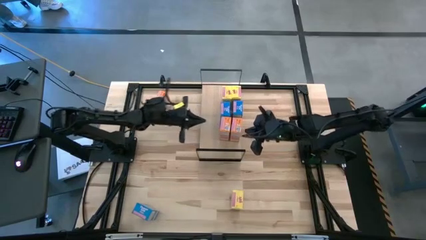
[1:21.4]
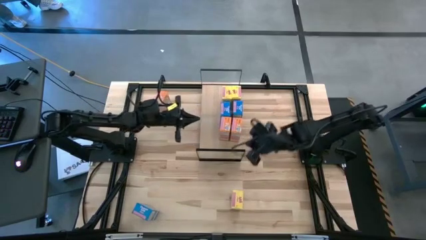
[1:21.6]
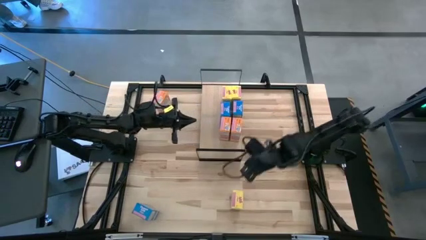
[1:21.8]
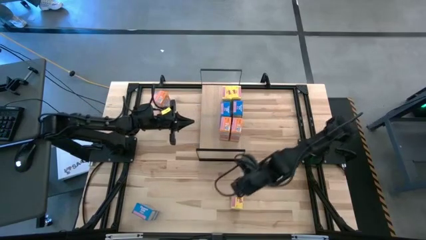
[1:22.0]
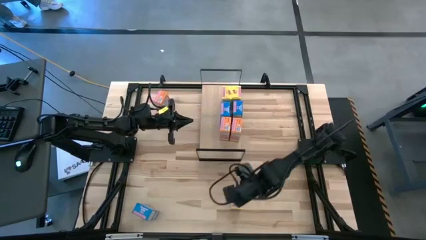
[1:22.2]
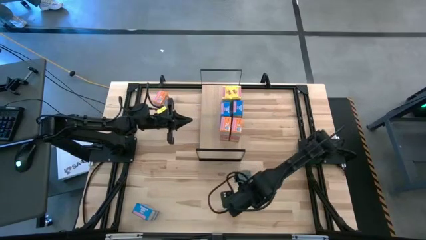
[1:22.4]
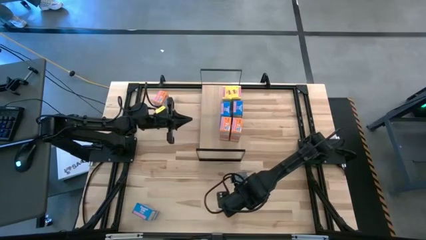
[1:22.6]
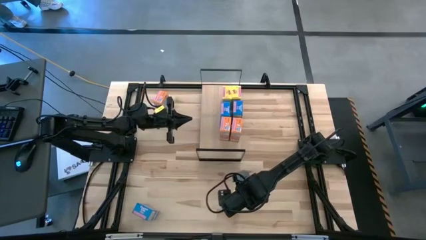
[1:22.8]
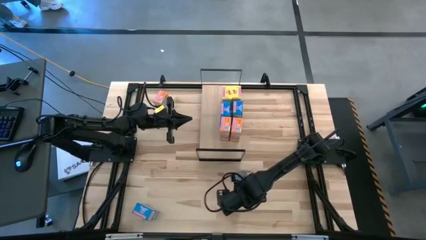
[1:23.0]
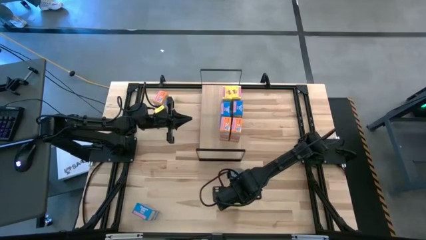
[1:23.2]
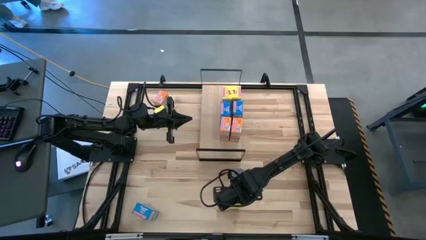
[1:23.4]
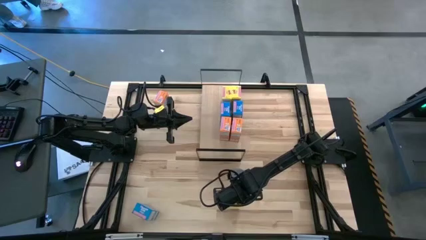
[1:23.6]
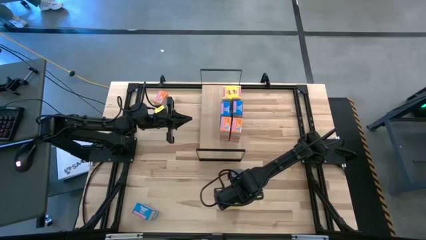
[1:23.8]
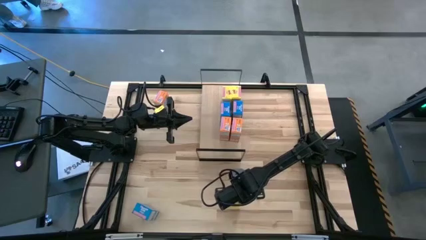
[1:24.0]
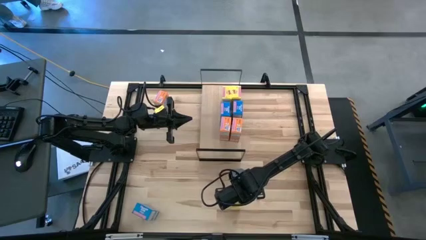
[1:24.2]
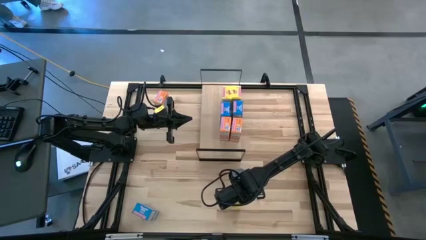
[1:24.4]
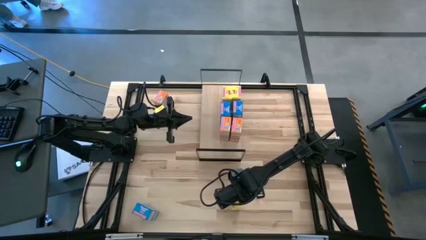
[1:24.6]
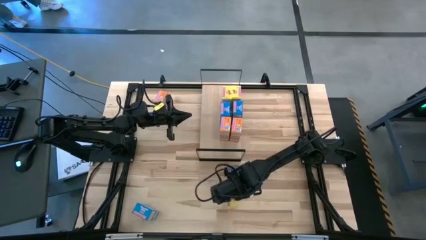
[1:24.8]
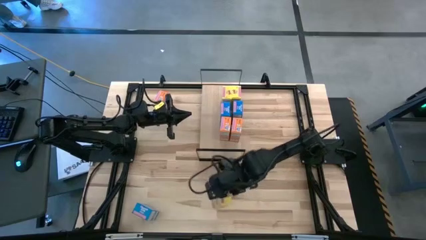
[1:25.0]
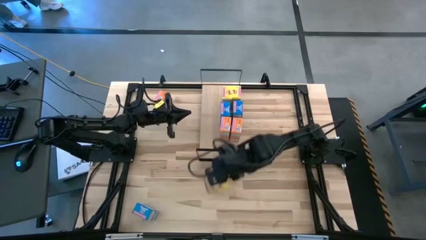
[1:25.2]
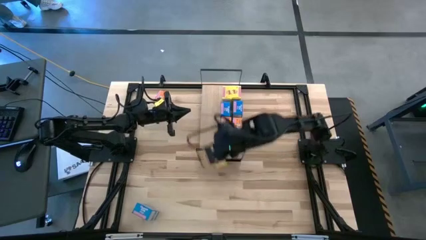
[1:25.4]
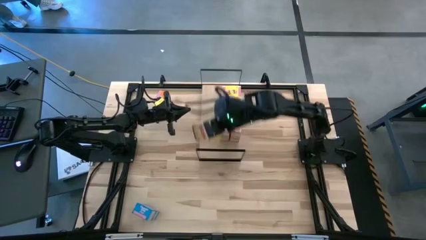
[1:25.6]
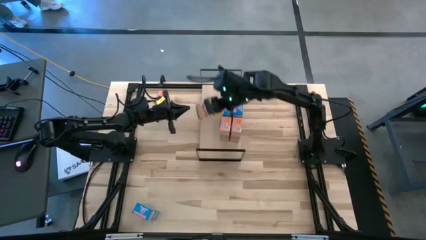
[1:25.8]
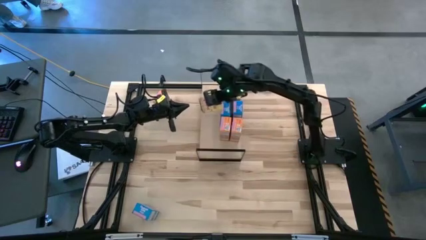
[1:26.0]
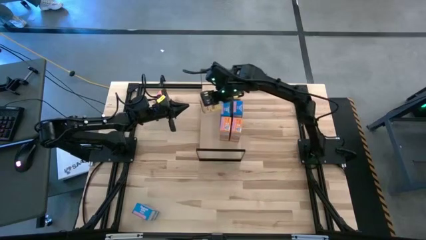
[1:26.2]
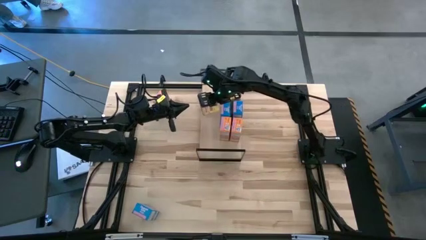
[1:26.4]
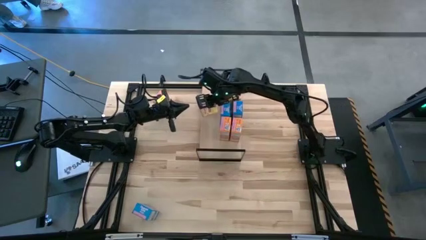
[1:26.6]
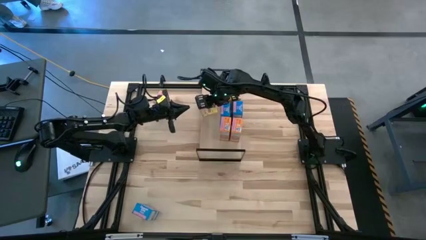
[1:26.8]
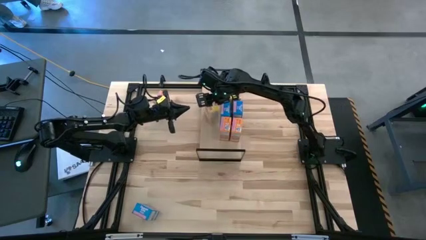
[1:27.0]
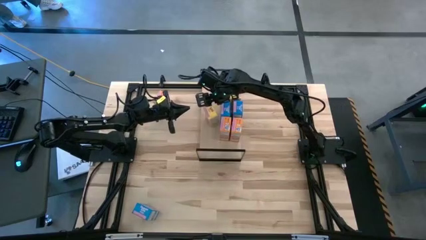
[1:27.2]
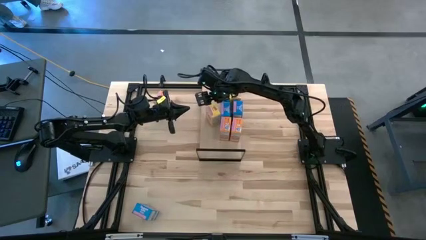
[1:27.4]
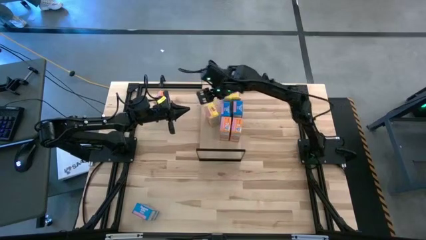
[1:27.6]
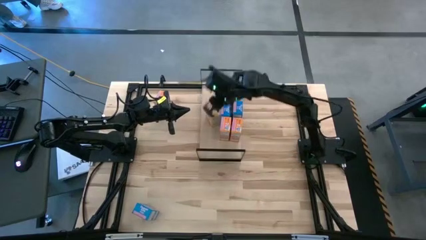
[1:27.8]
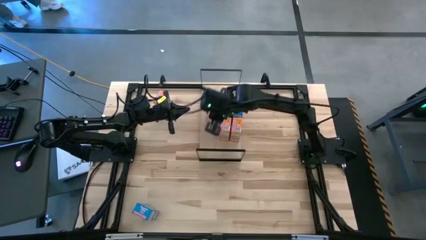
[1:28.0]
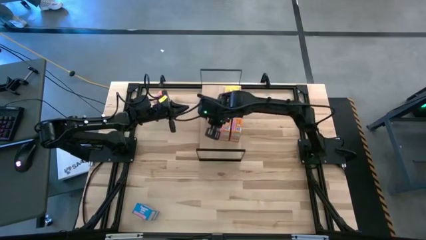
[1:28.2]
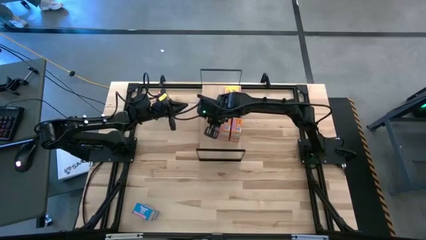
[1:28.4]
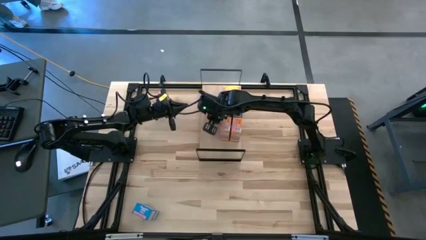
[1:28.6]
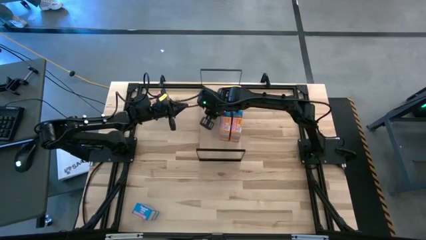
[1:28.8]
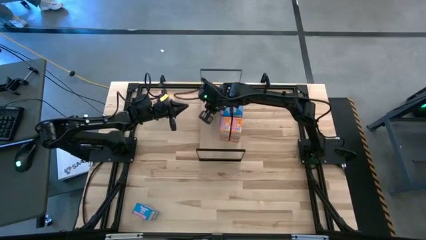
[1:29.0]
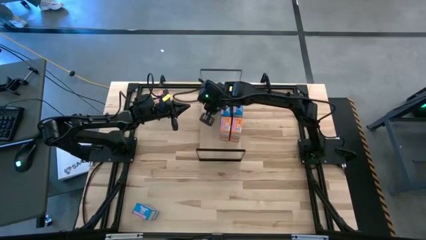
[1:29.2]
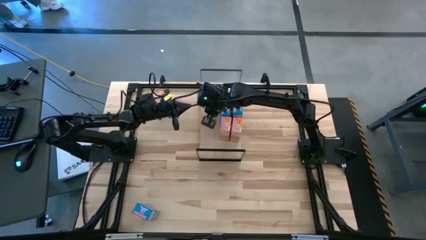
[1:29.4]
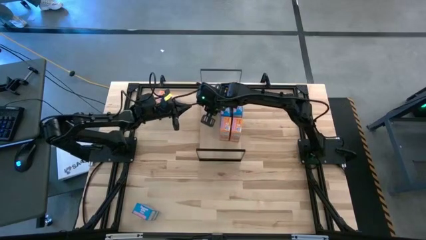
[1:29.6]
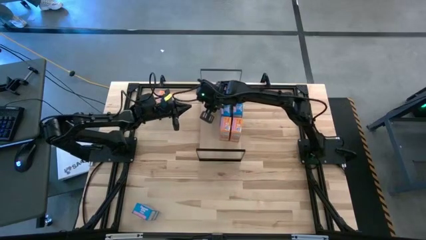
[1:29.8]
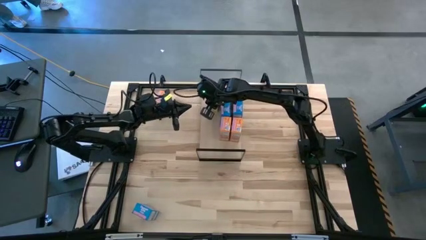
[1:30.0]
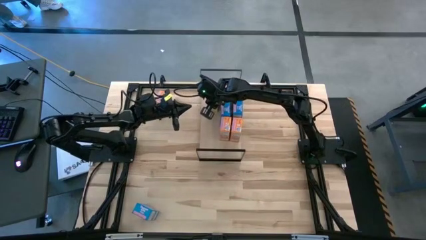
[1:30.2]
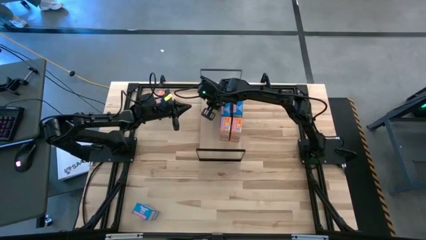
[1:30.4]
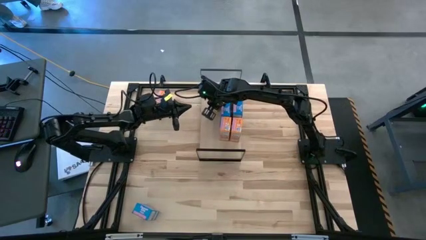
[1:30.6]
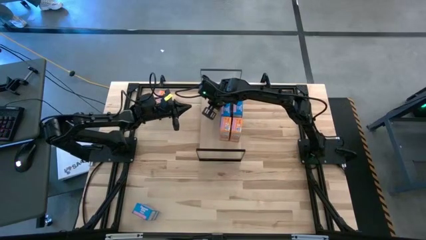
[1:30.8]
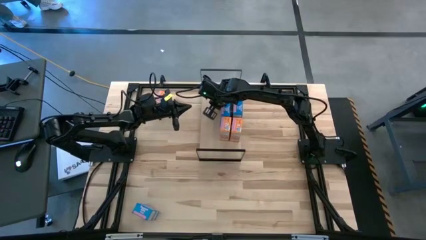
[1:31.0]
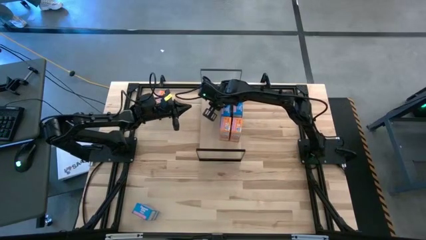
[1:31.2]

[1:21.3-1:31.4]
Task: Stack cereal on shelf
Put the yellow cereal box on the shelf aligned with the other yellow cereal boxes on the shelf

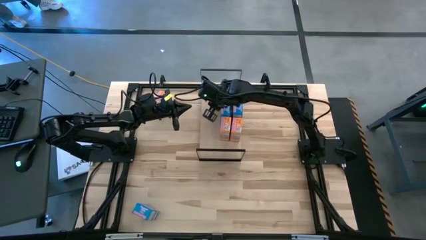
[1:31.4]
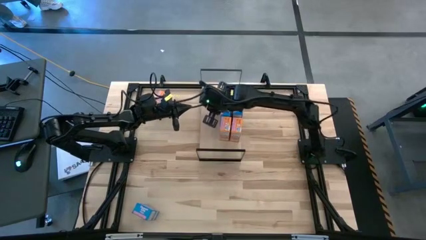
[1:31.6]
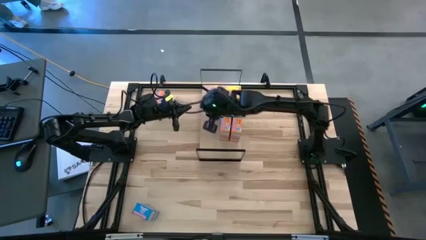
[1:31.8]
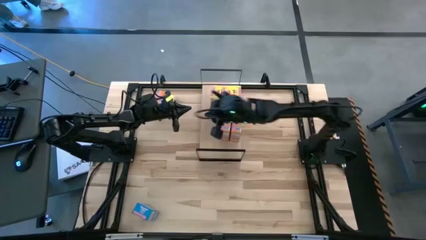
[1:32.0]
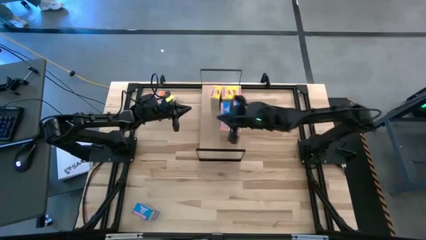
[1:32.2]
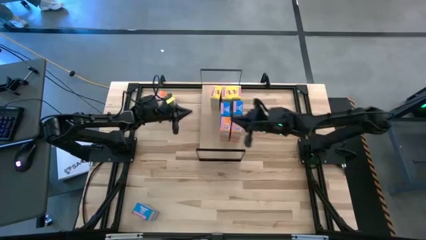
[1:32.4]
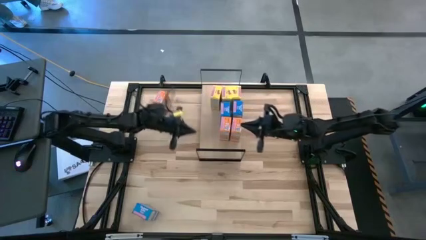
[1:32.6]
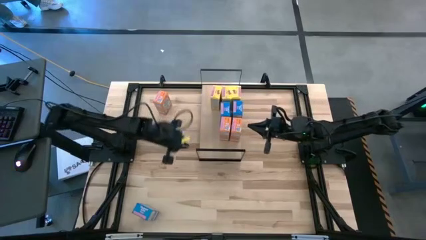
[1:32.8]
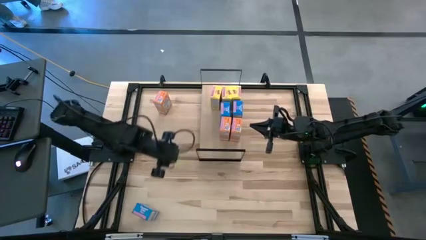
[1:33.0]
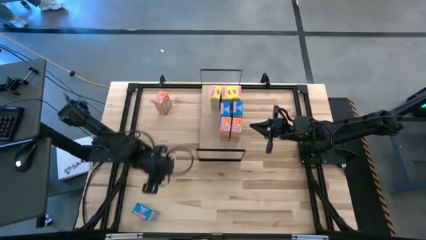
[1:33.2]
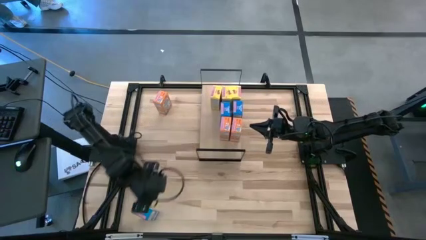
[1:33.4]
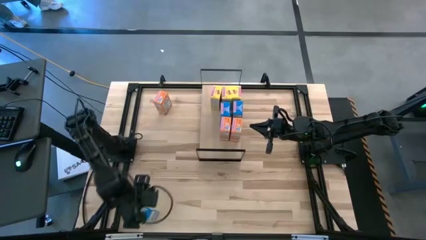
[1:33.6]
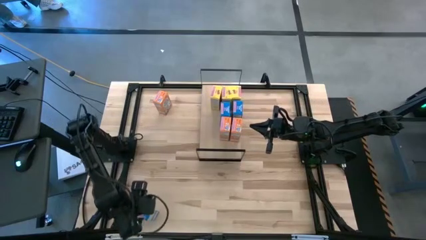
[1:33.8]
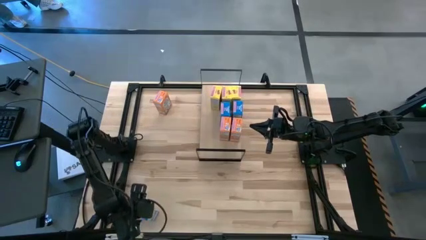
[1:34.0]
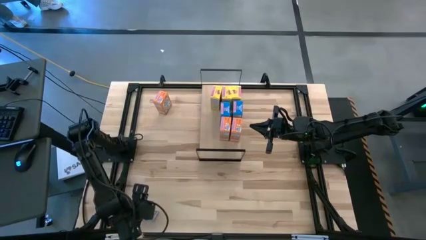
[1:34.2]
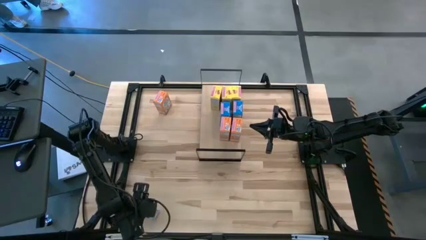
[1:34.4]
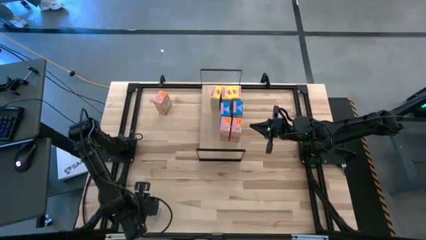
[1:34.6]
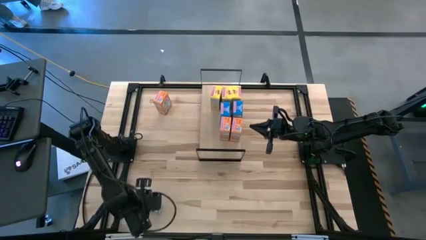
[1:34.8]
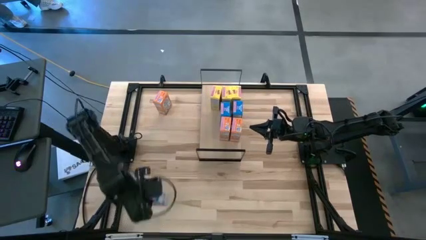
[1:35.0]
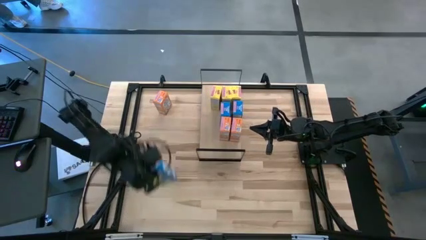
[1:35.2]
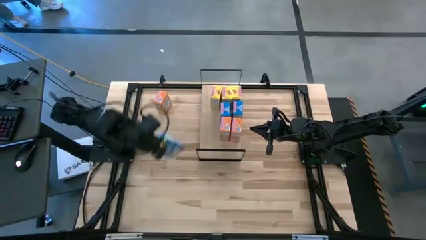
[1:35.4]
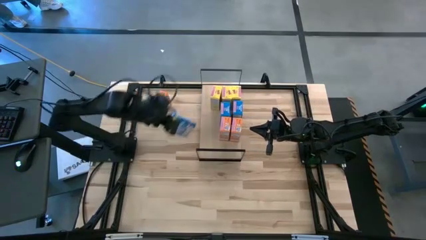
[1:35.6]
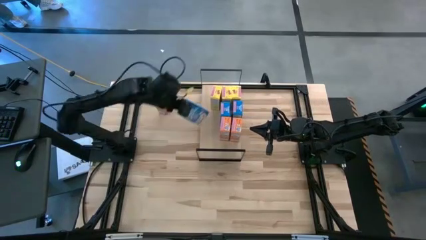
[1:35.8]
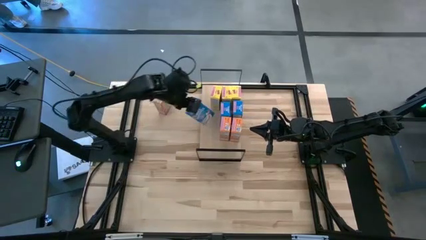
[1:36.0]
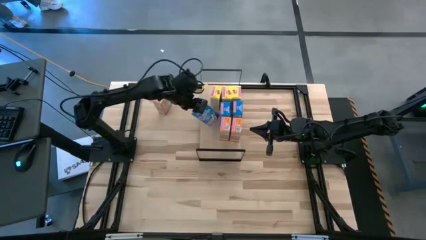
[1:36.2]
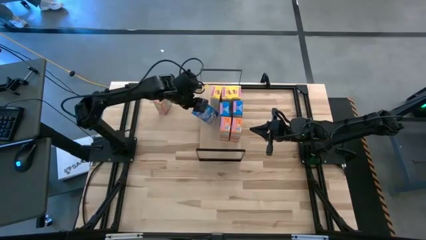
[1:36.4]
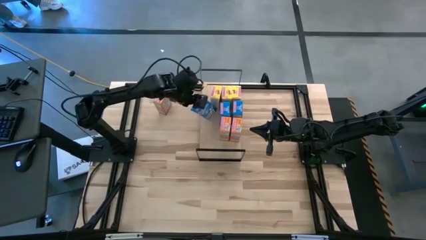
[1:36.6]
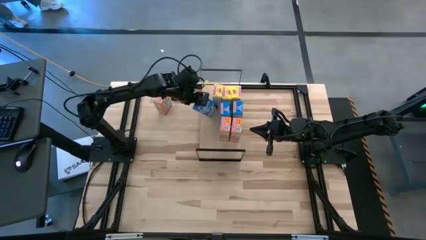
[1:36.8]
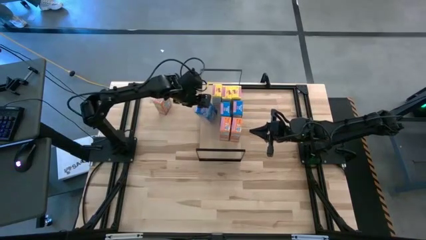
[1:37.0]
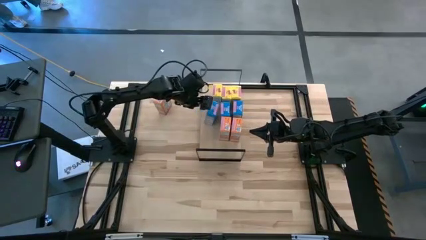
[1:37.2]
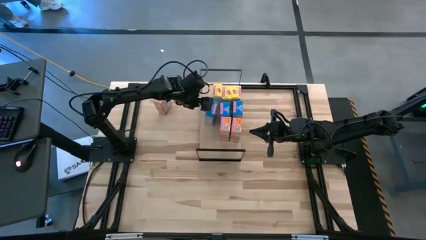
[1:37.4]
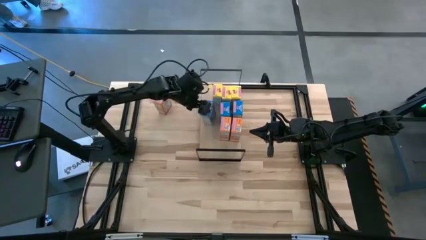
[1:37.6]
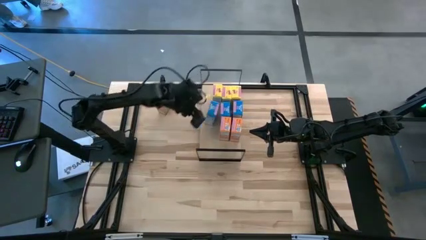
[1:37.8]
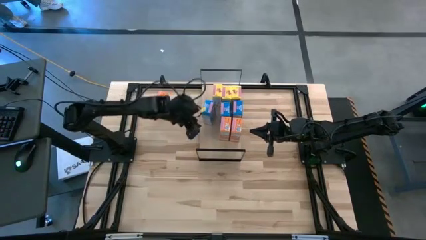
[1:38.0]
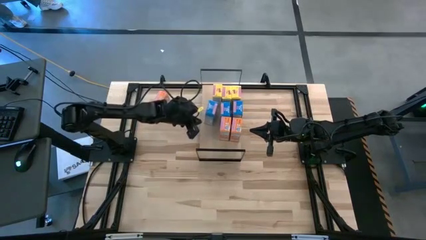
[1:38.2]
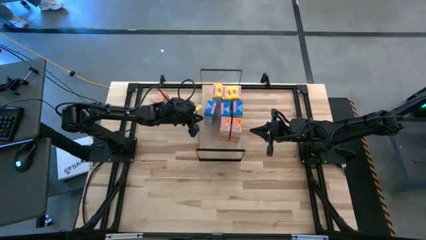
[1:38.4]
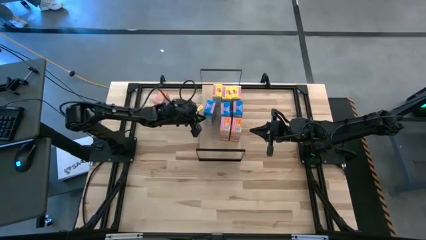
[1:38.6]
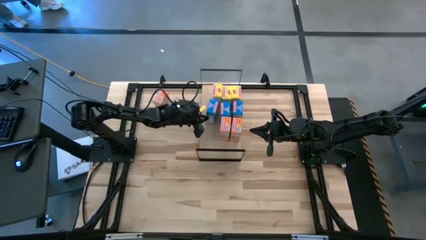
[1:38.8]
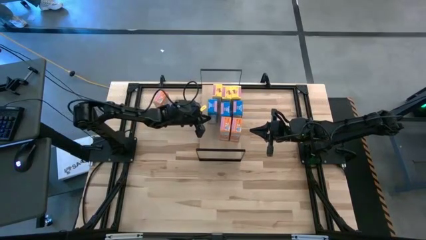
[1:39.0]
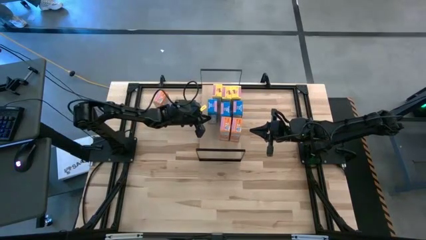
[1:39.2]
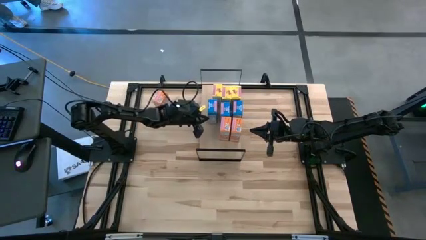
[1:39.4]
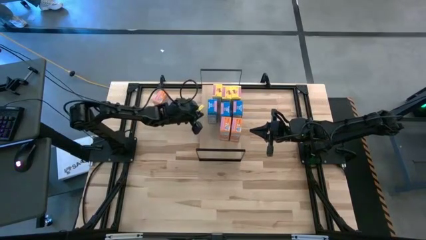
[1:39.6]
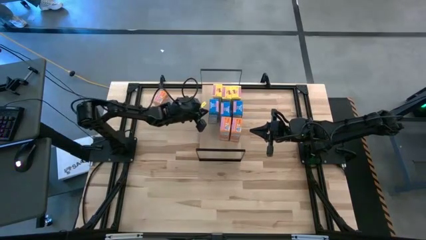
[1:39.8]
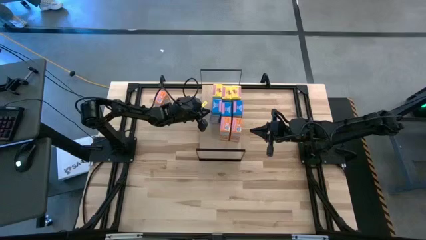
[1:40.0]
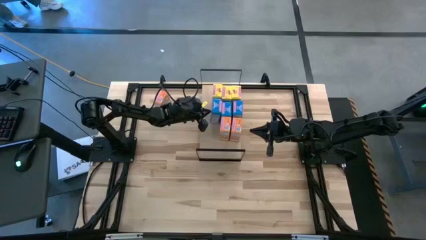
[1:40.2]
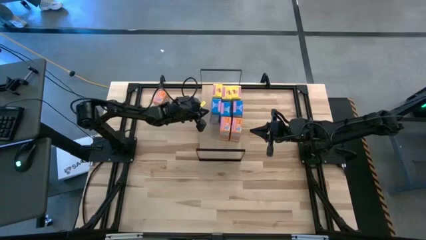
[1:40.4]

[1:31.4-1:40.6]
Put the blue cereal box on the shelf aligned with the other blue cereal boxes on the shelf
